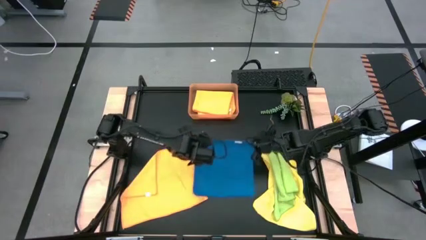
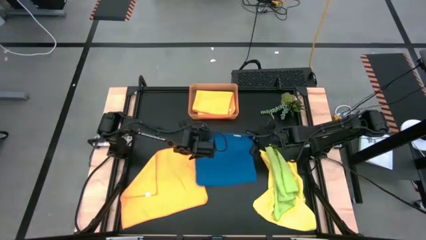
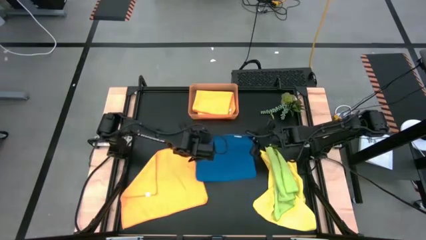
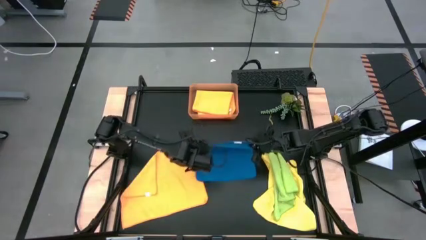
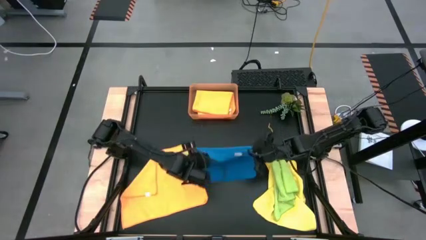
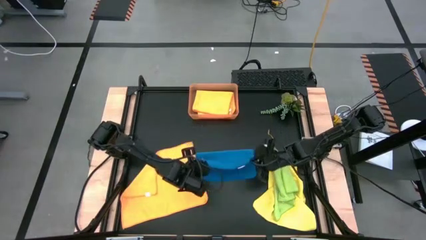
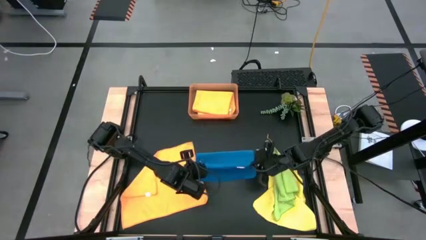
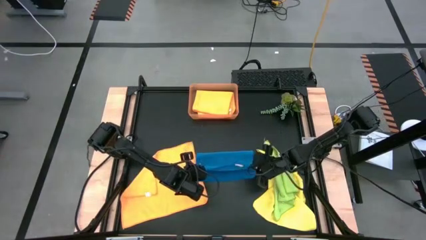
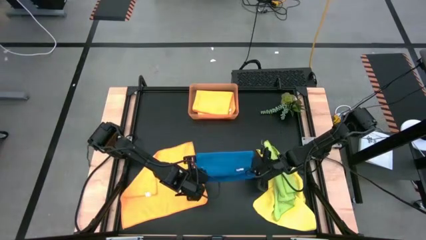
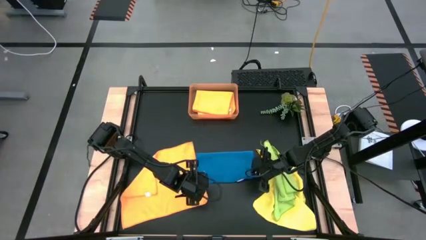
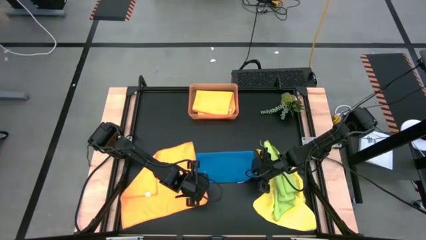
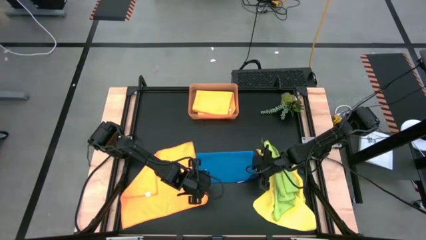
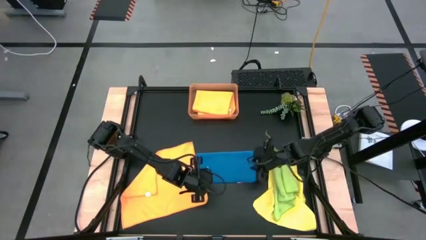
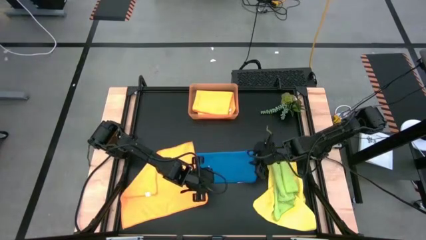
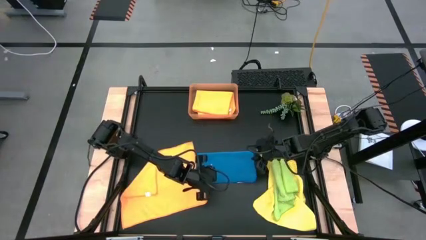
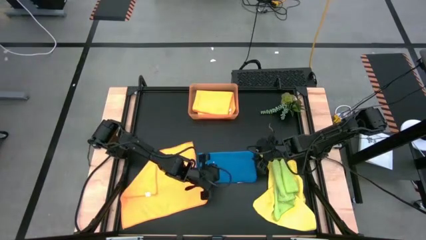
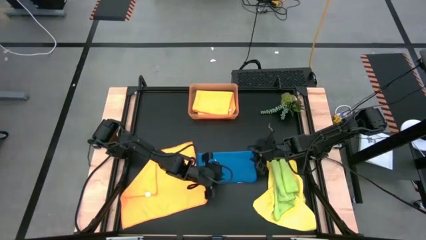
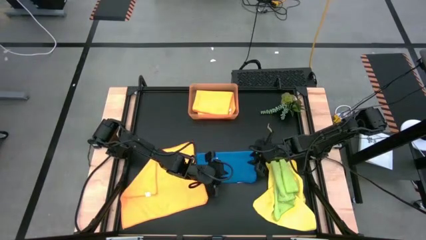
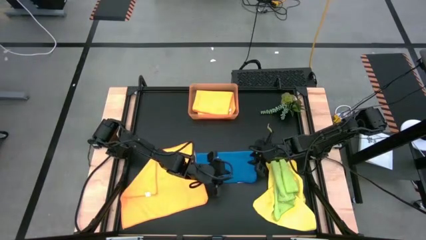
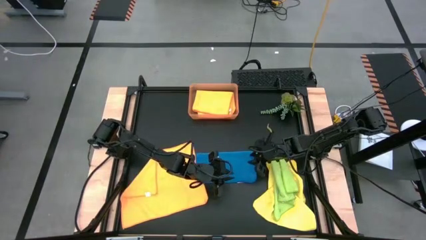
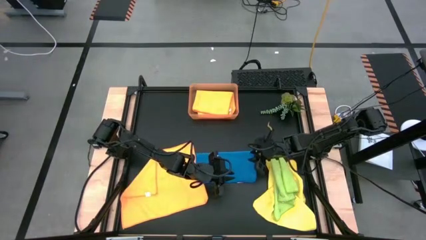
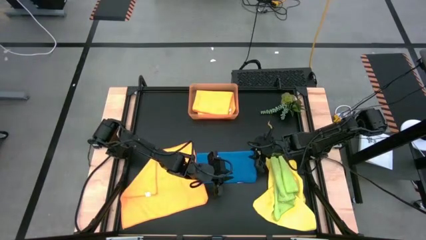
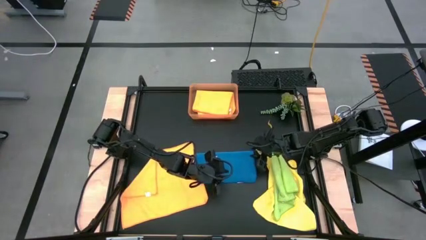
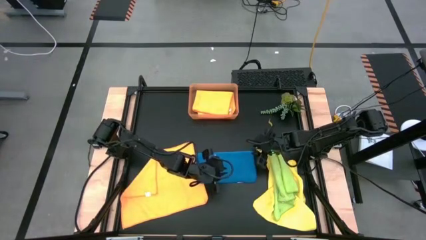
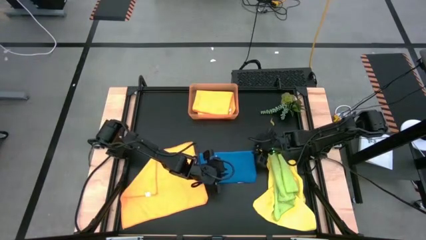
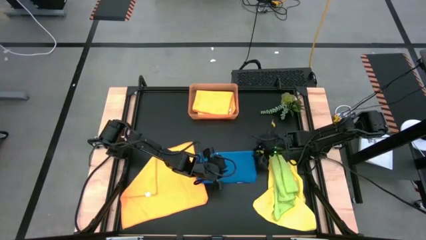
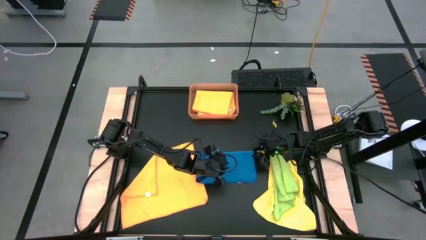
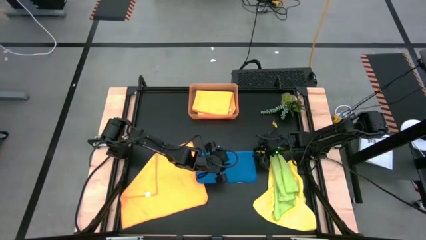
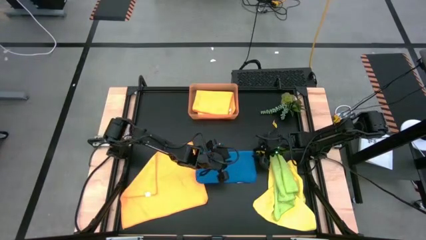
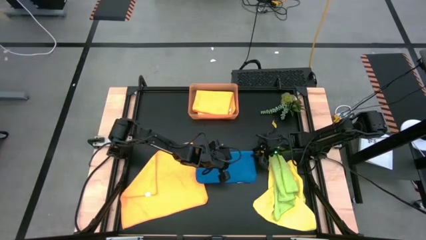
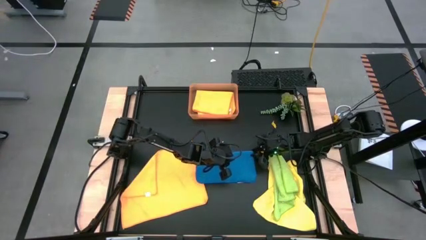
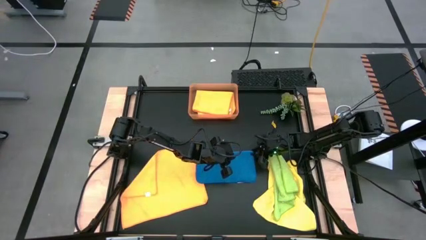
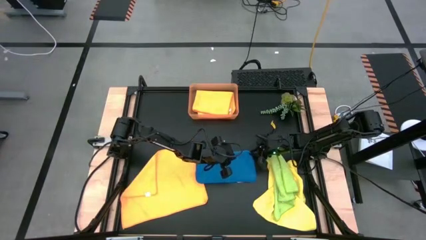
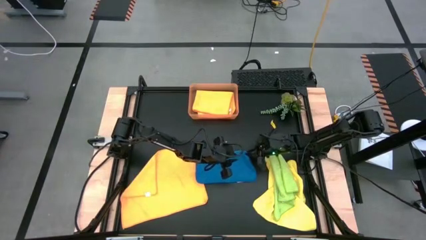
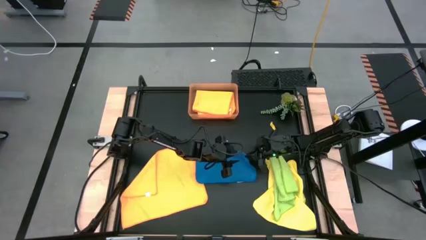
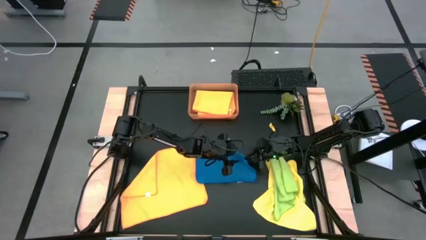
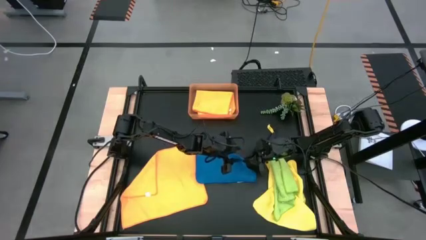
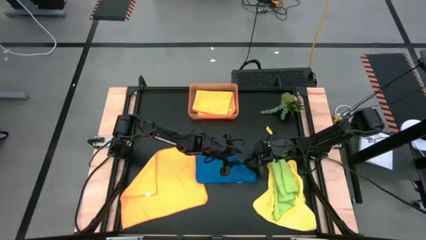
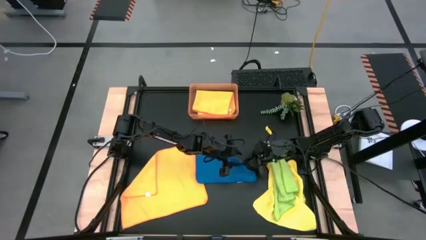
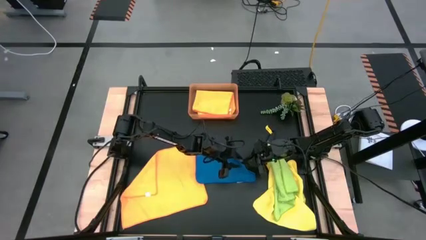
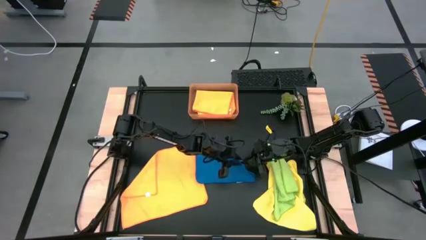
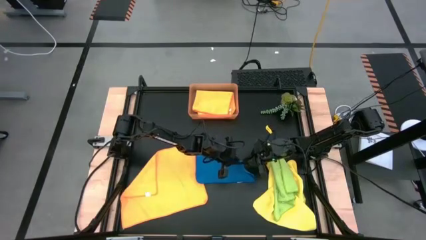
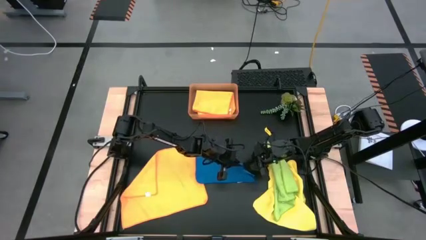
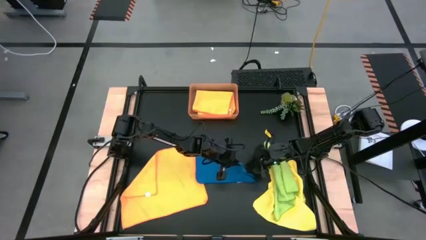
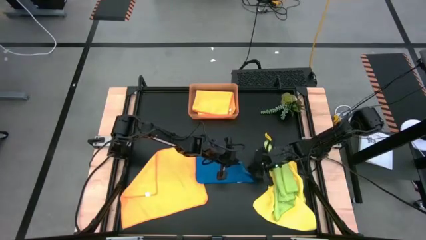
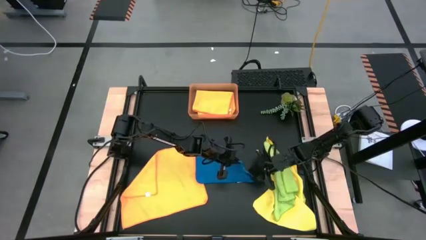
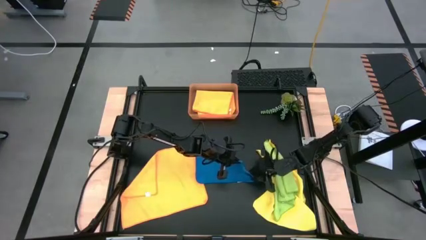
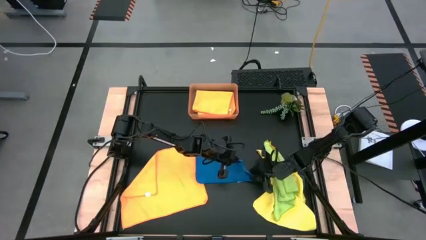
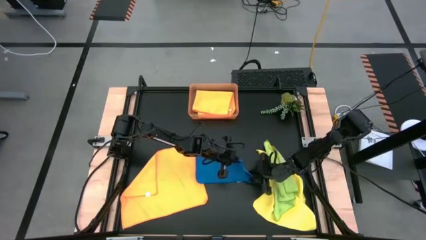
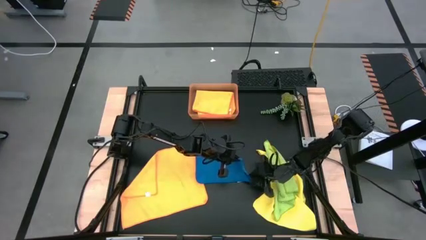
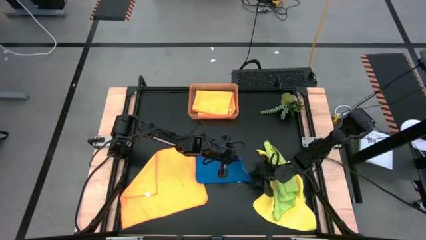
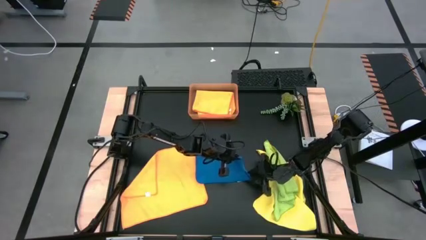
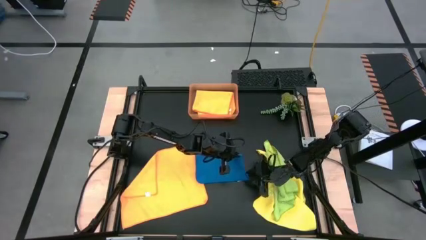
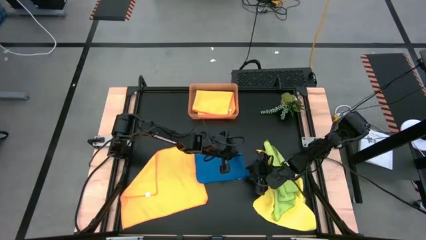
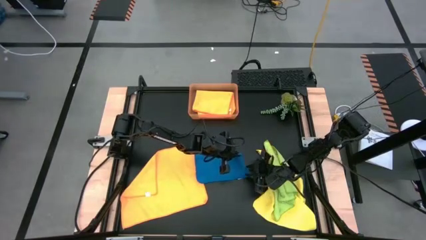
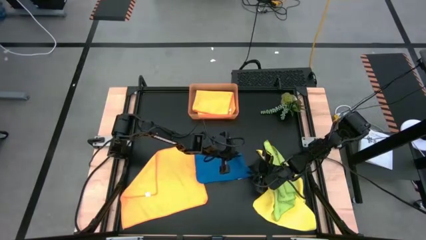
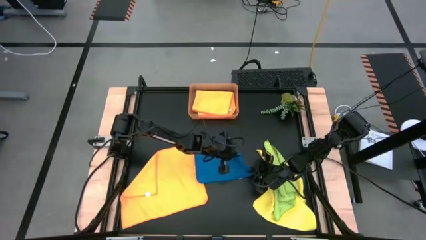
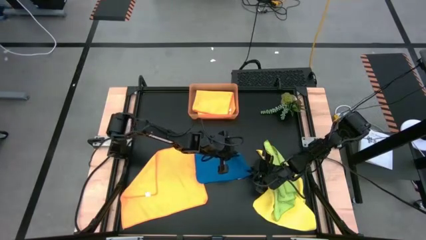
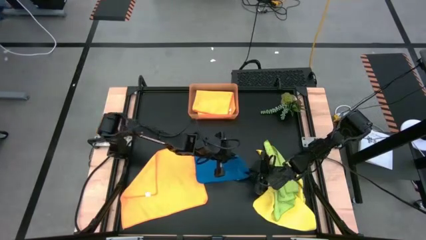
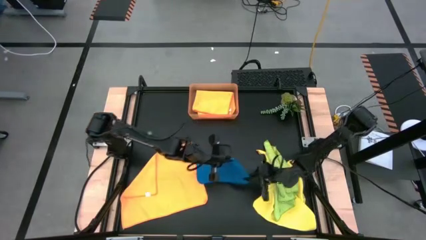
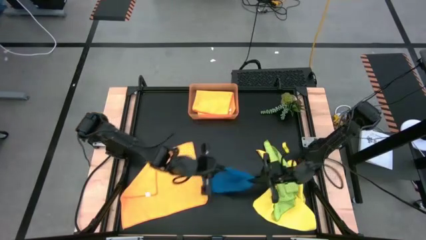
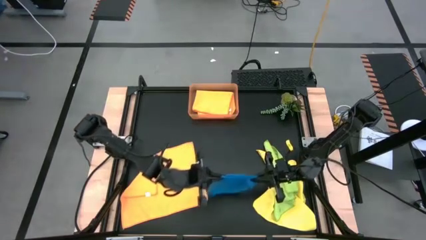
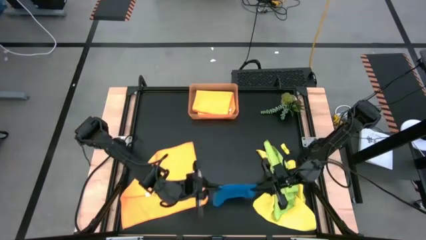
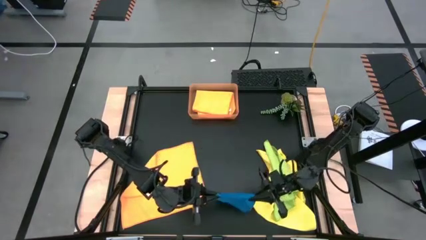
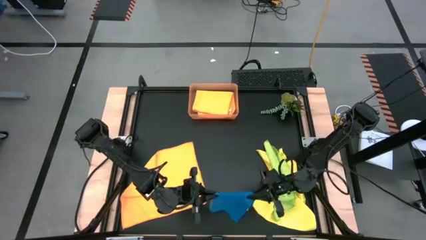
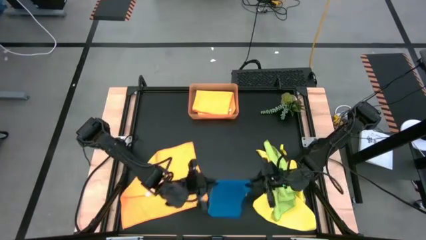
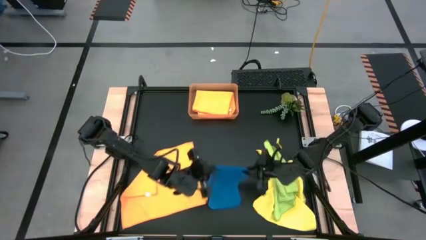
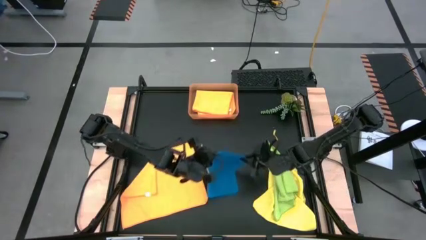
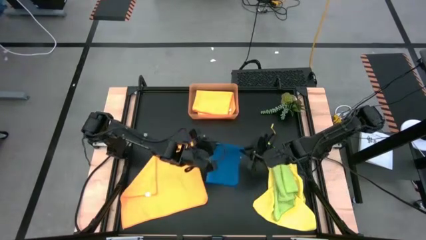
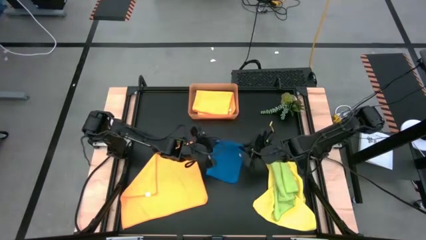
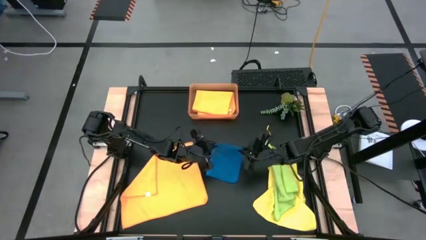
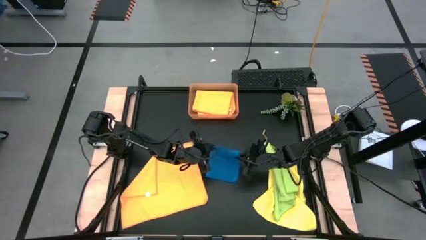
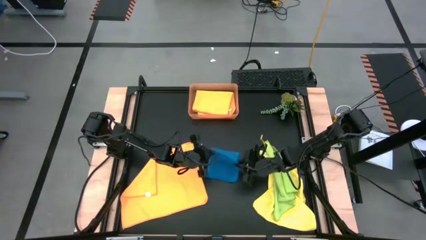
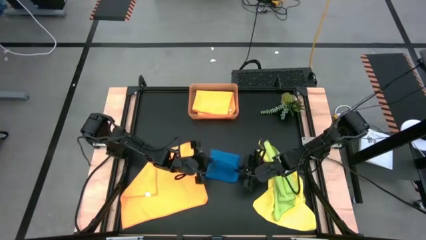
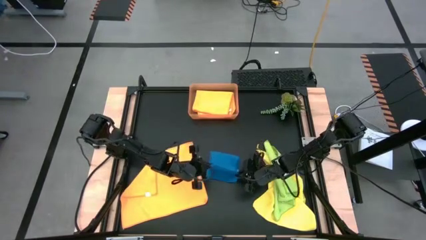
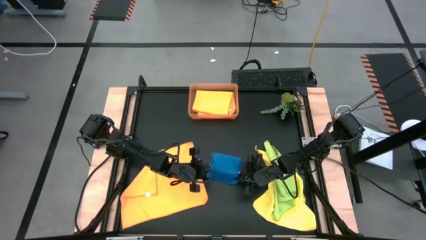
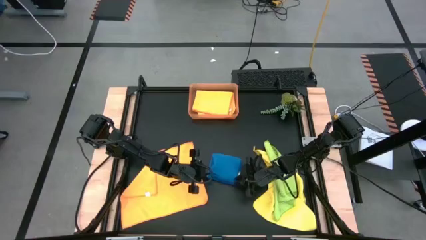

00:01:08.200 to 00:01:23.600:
Task: Fold microfiber towels
Fold the blue towel
